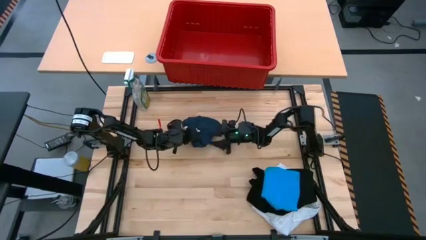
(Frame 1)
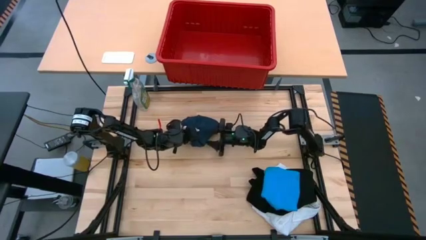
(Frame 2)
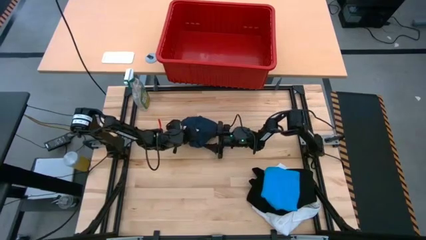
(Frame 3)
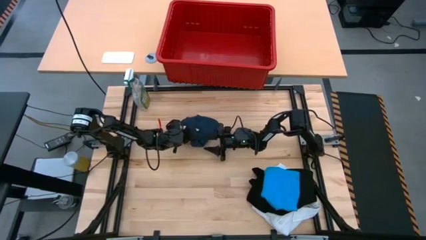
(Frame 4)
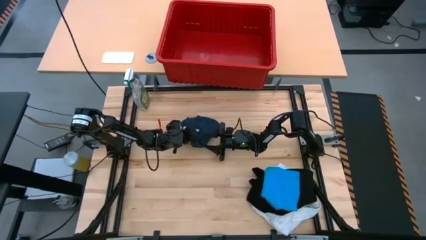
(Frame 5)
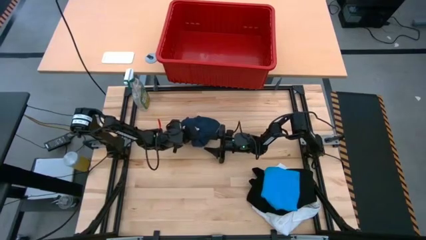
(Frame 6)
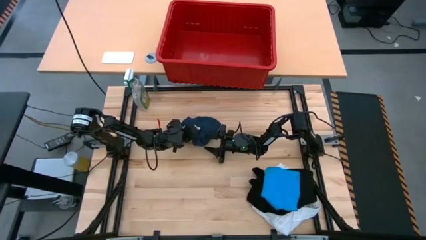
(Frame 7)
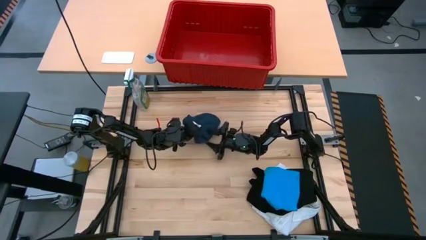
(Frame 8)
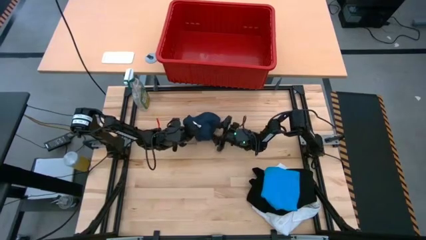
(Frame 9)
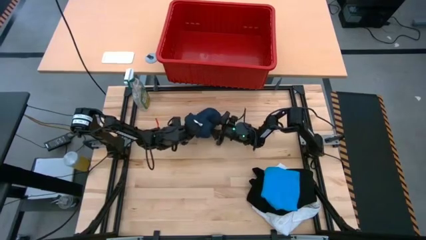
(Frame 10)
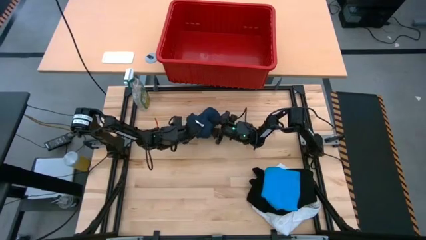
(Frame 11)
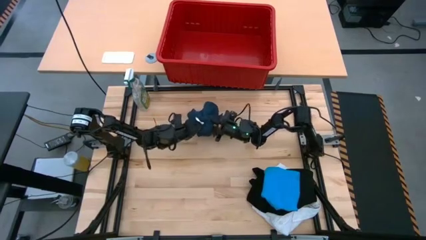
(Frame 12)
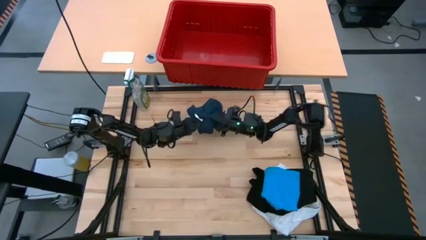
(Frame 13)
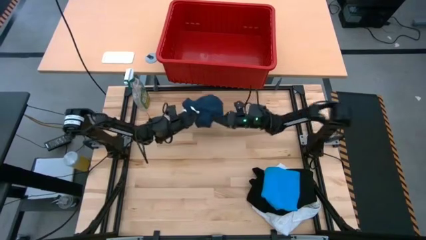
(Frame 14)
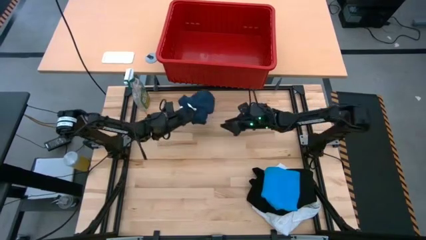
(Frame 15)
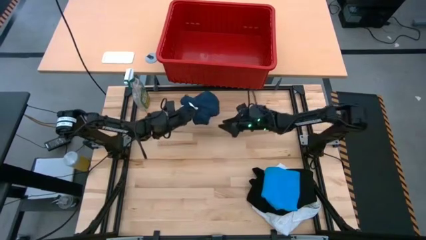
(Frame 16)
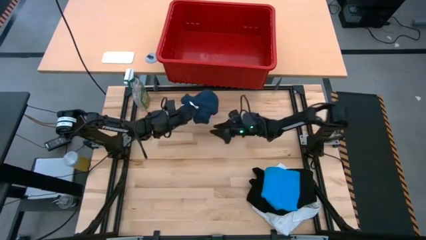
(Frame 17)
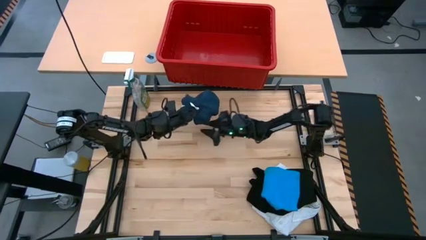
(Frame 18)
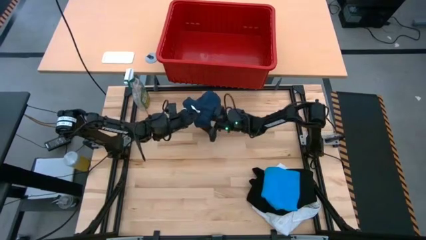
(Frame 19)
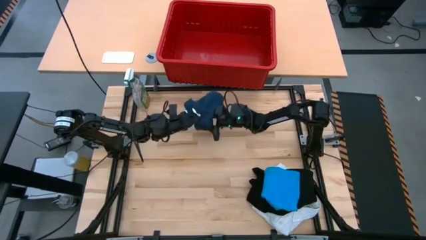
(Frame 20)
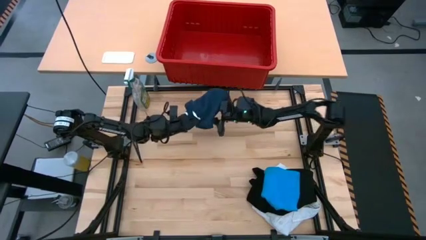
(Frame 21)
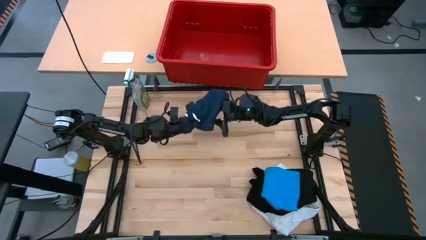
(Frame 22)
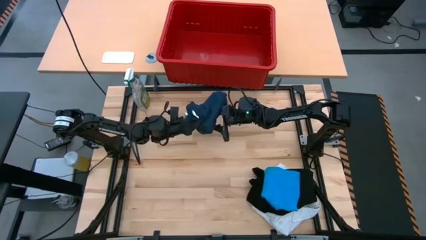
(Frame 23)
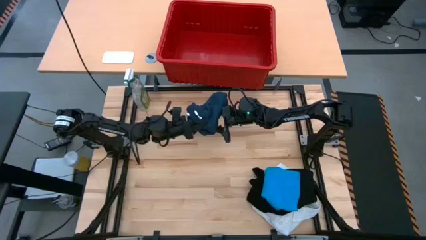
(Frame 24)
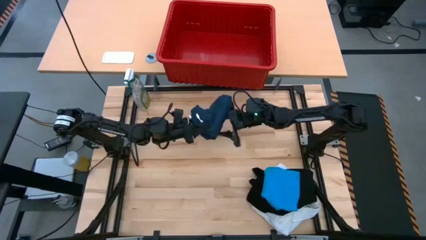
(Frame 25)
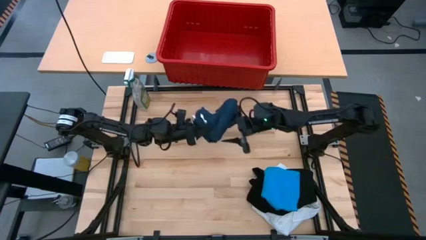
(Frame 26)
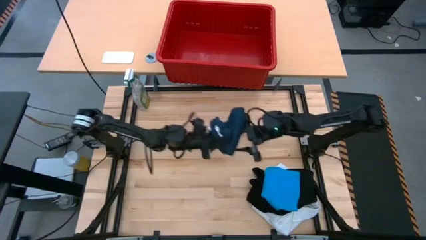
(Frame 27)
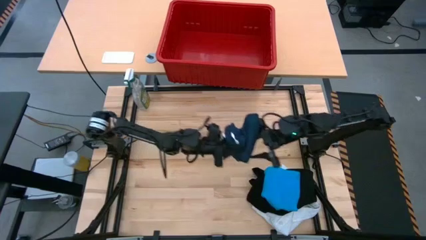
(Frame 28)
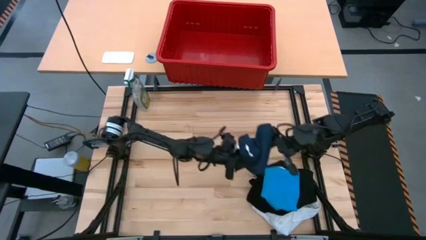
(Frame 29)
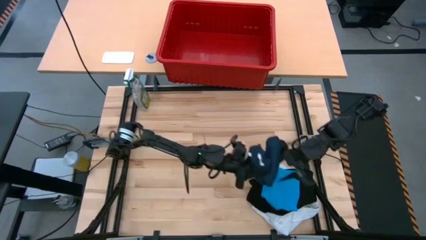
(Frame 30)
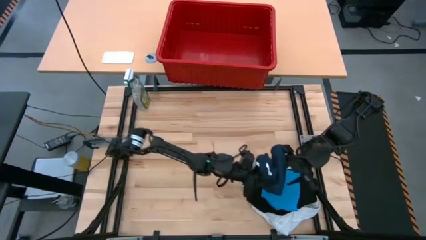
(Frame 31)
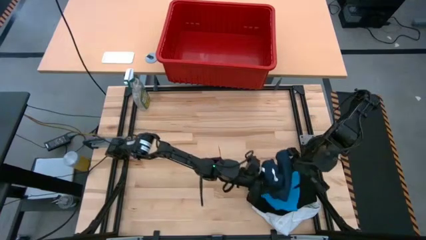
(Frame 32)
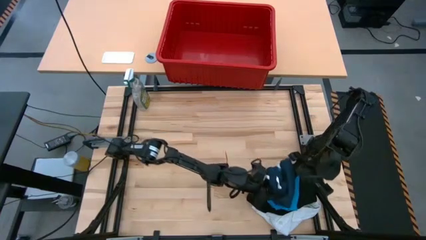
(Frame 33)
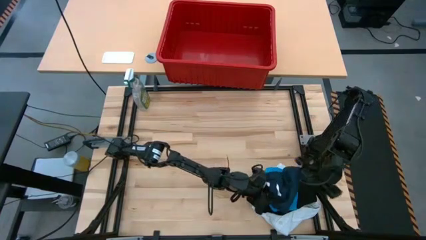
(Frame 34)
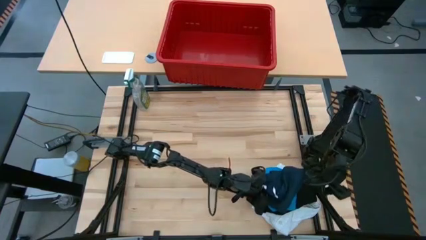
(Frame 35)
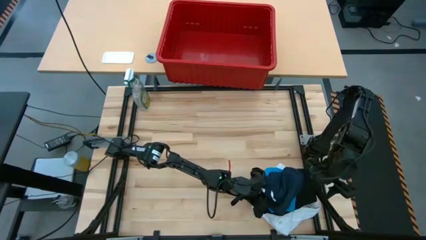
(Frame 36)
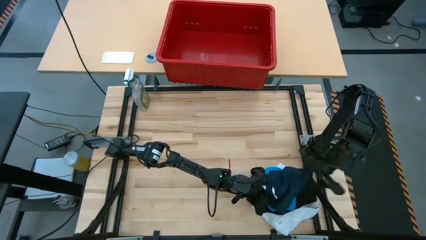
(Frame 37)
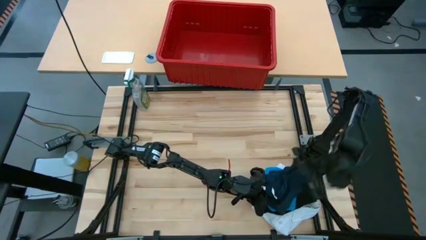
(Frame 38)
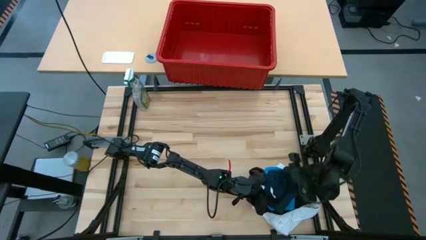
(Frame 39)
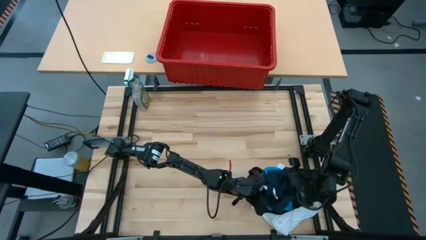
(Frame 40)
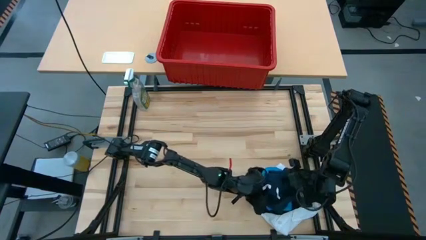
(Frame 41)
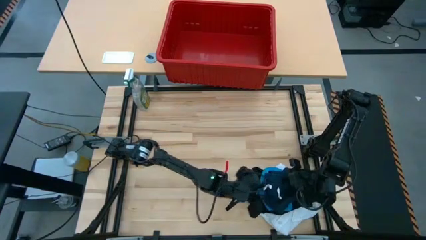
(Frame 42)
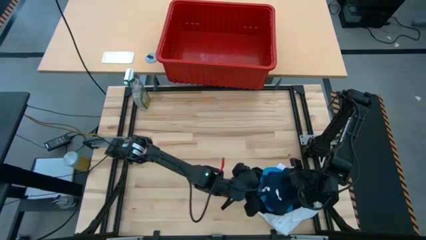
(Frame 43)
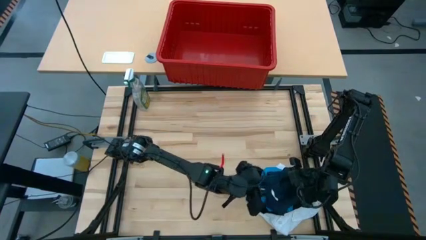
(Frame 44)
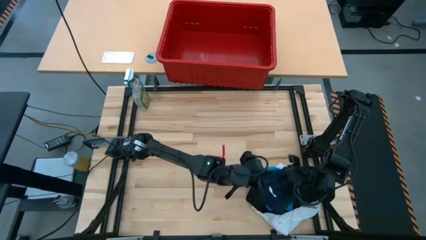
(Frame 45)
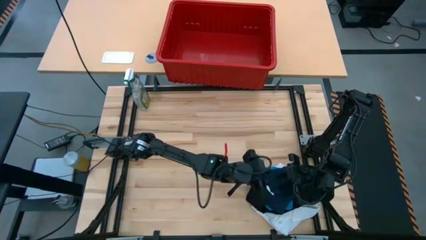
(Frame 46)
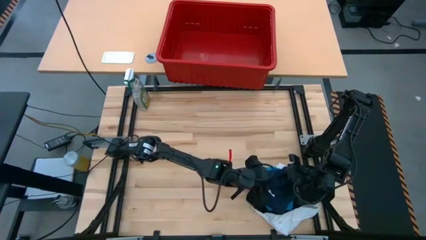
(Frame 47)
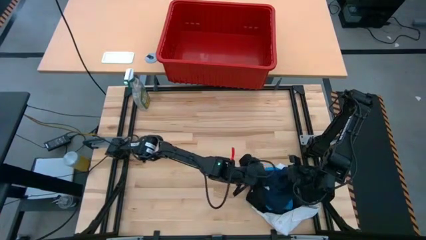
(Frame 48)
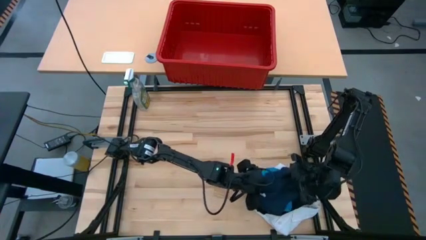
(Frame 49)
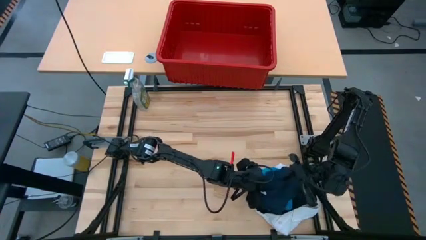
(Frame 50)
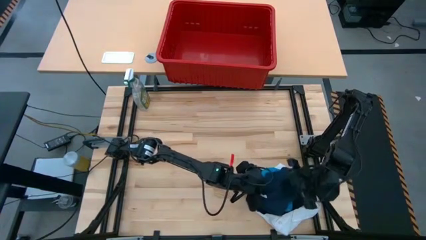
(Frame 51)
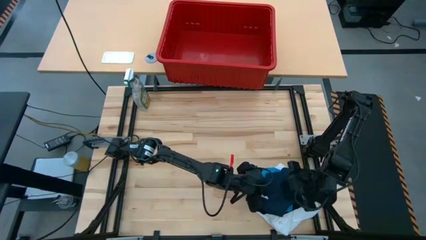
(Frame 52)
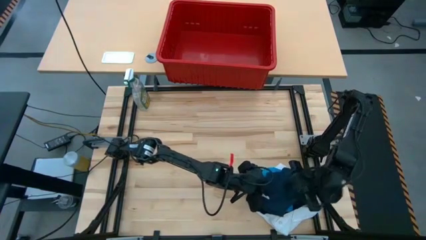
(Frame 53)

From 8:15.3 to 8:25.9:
Task: Fold laundry
Stack the folded dark blue shorts on top of the folded blue shorts

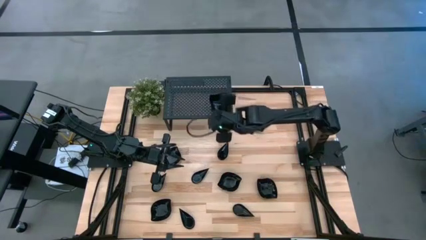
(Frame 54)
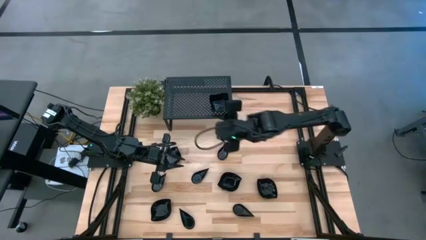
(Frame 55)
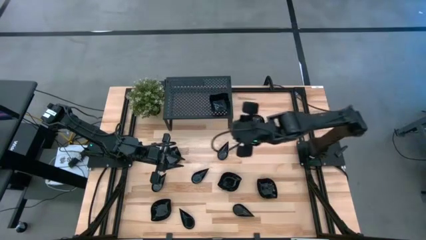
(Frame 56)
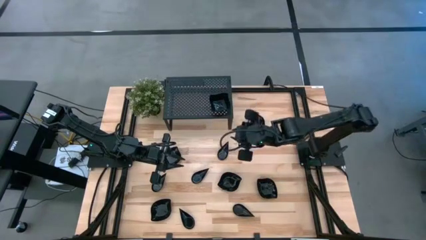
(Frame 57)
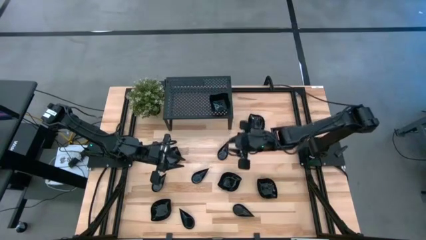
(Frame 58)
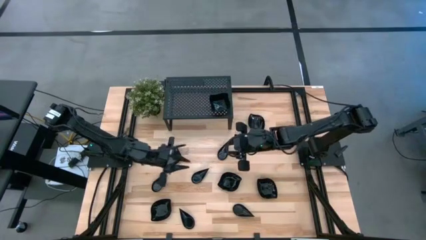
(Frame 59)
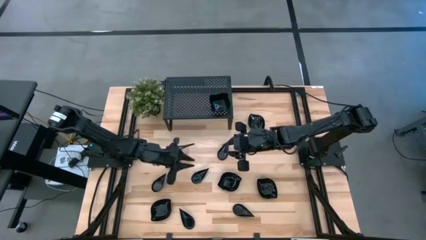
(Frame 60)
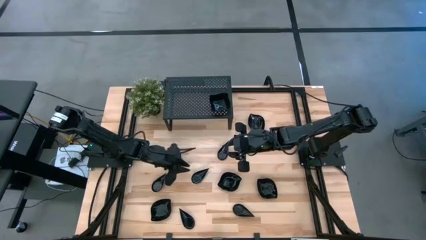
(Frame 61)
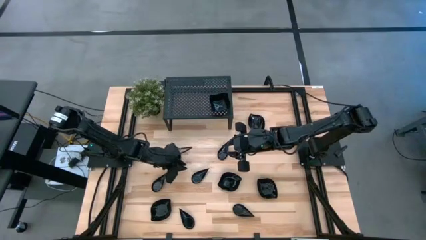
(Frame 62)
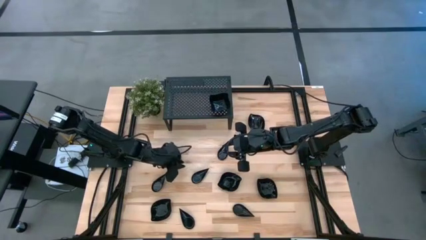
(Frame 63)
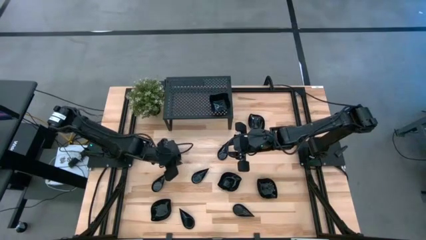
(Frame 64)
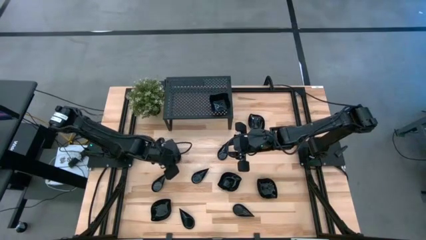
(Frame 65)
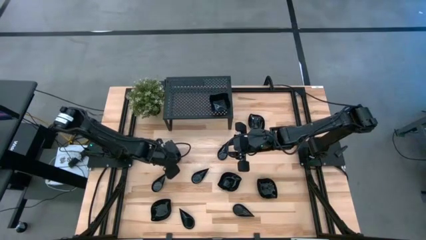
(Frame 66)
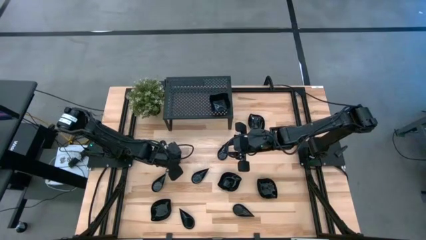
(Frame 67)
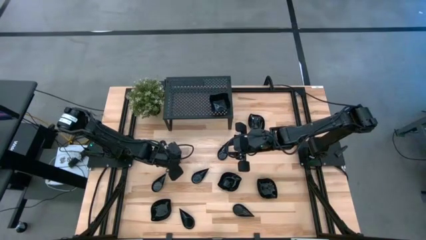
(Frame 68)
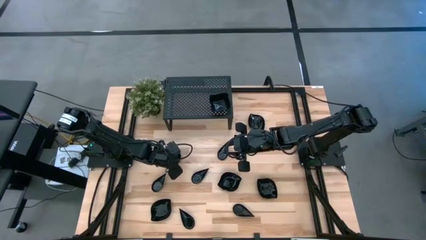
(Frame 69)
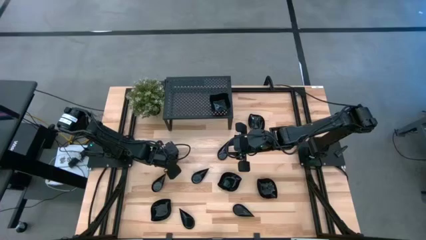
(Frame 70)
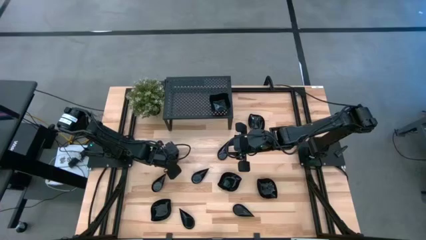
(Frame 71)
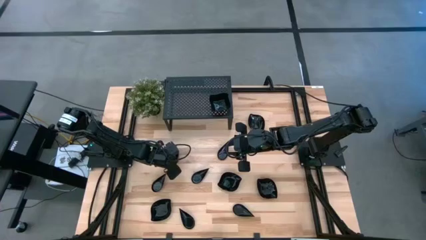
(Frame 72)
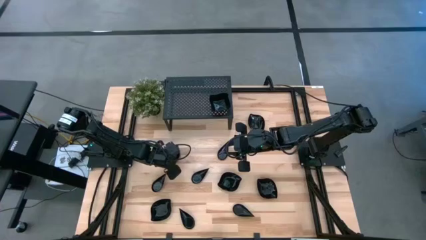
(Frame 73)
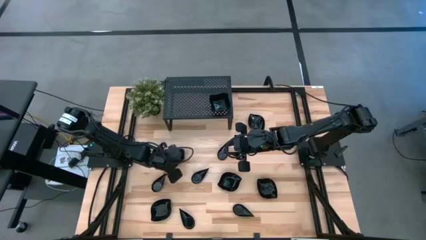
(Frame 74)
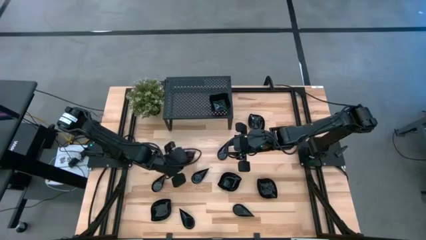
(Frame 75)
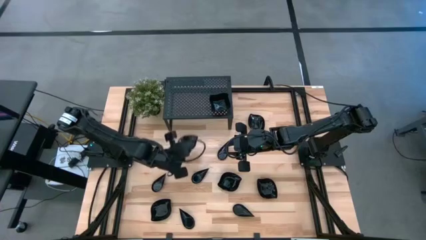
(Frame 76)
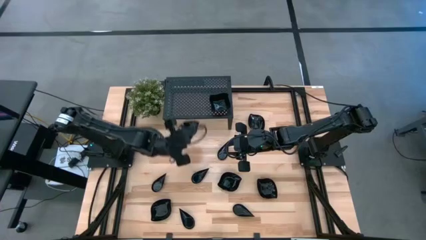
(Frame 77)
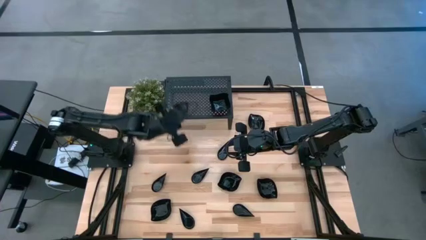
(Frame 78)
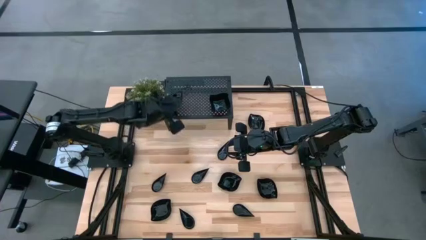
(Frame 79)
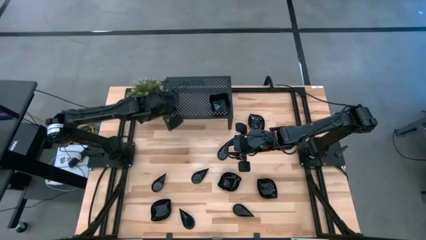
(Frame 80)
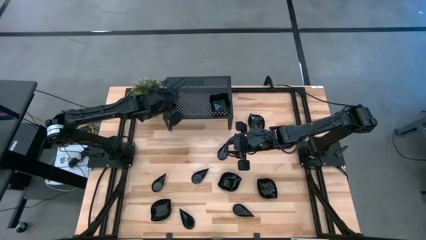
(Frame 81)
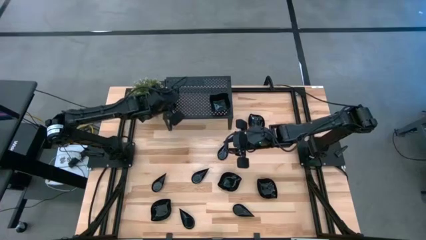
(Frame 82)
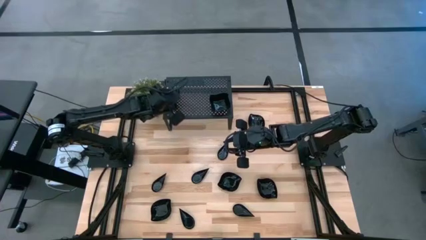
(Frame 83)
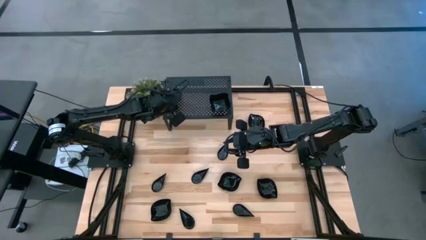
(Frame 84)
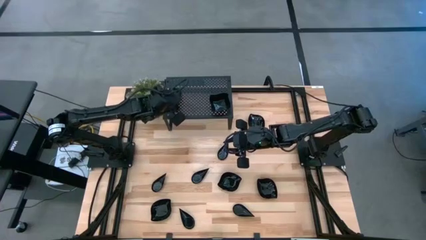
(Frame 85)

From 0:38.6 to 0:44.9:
Task: Pick & Place Mini shaped plates
Put the black leaf-shaped plate on the shelf
